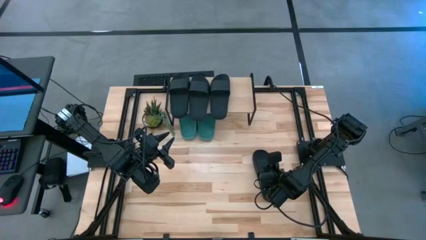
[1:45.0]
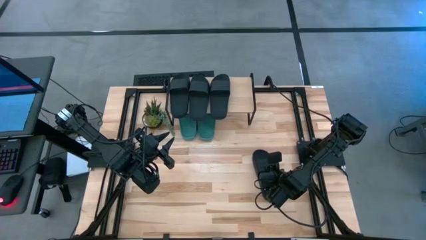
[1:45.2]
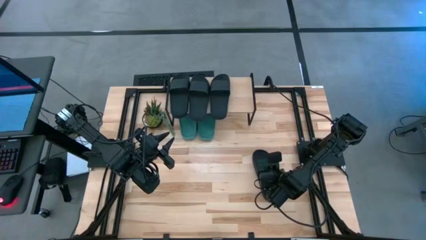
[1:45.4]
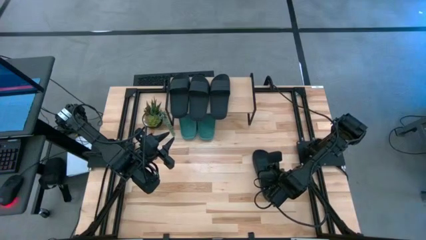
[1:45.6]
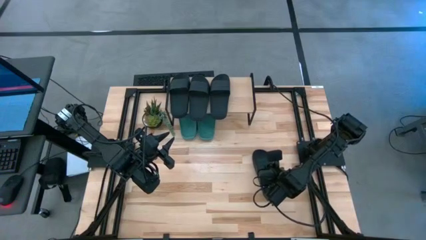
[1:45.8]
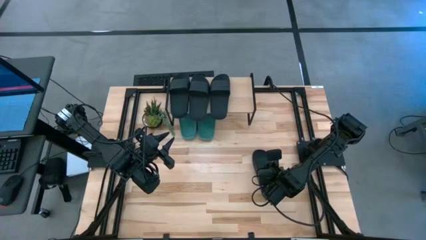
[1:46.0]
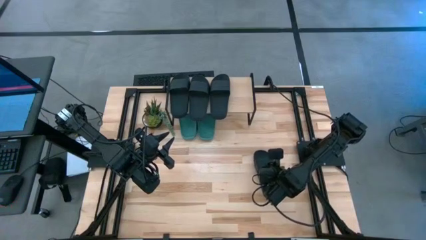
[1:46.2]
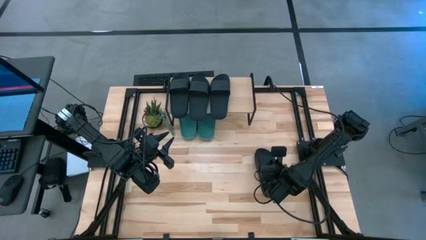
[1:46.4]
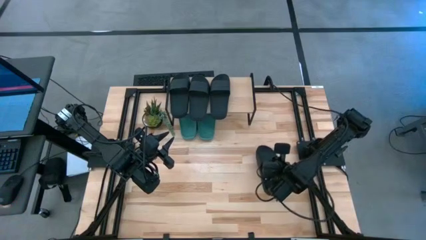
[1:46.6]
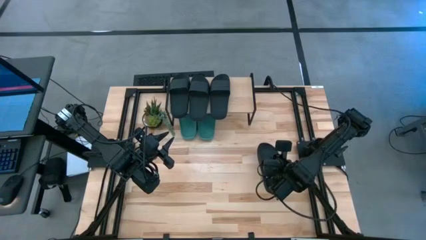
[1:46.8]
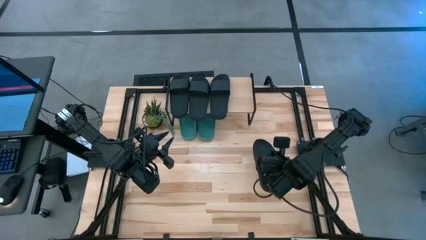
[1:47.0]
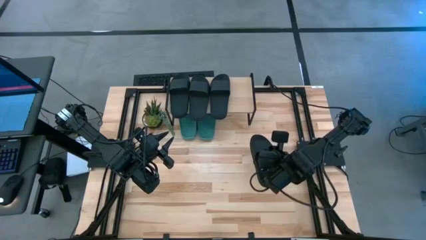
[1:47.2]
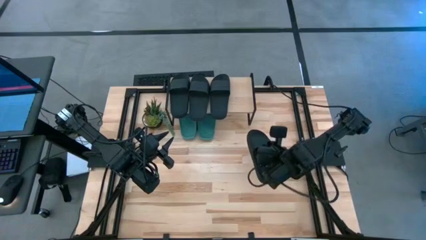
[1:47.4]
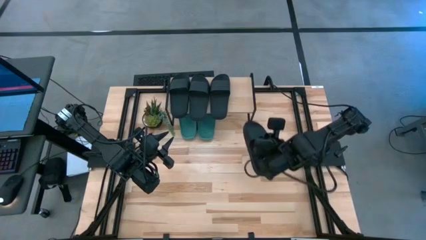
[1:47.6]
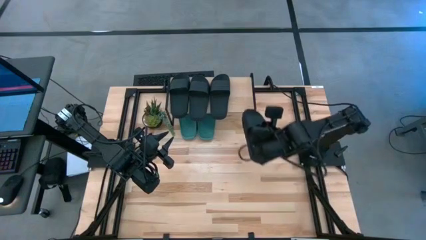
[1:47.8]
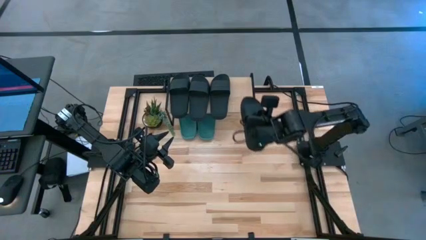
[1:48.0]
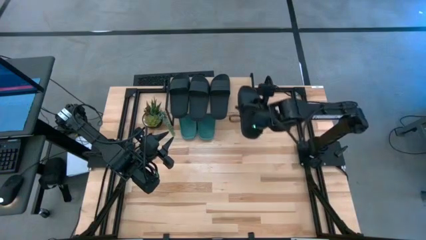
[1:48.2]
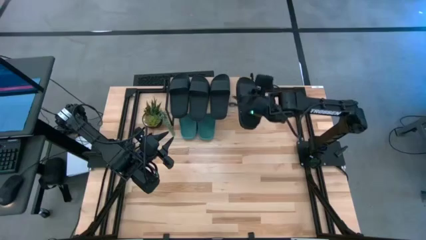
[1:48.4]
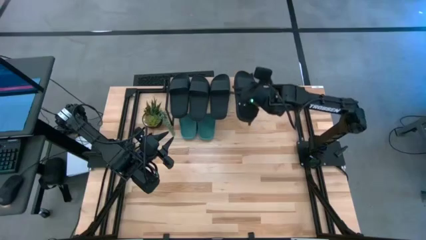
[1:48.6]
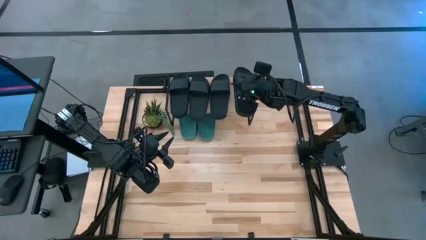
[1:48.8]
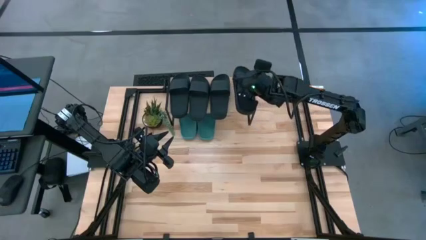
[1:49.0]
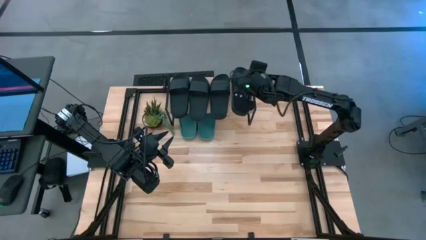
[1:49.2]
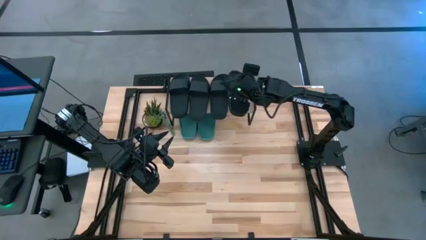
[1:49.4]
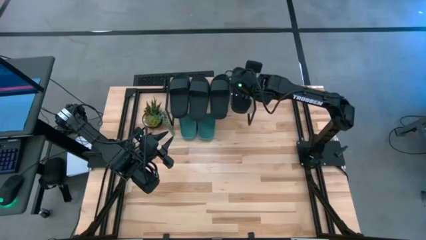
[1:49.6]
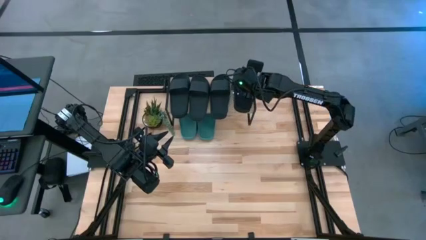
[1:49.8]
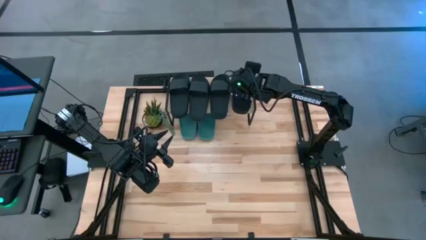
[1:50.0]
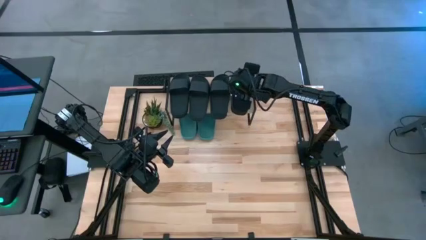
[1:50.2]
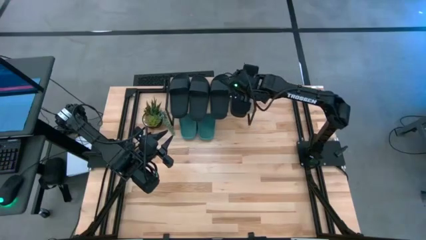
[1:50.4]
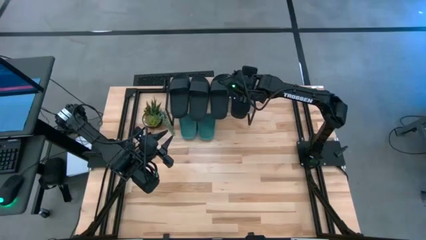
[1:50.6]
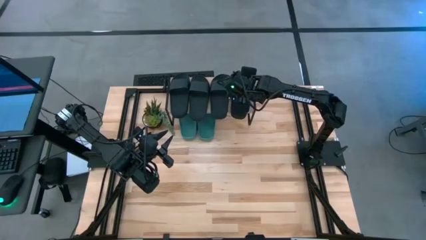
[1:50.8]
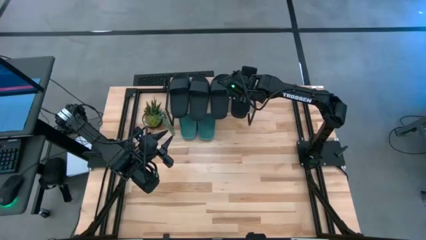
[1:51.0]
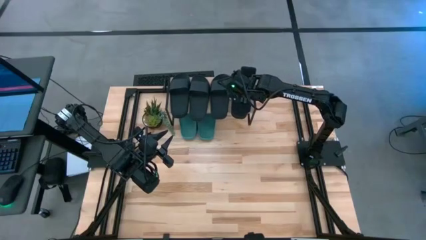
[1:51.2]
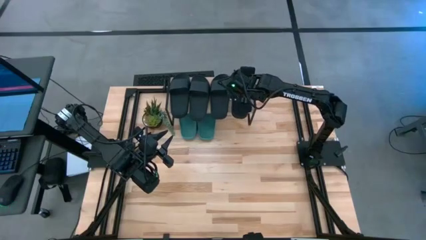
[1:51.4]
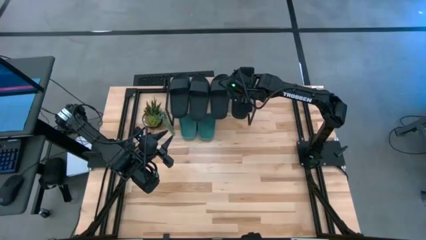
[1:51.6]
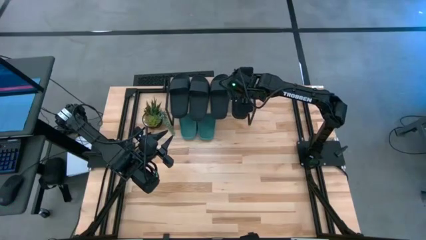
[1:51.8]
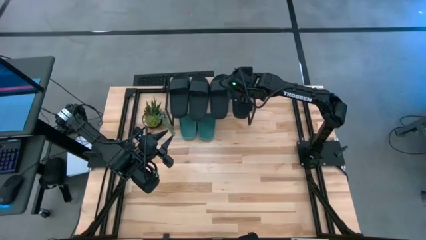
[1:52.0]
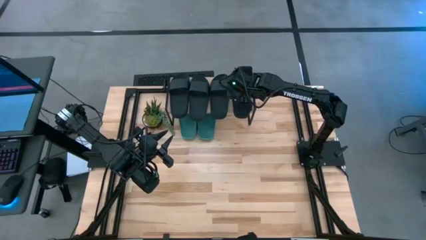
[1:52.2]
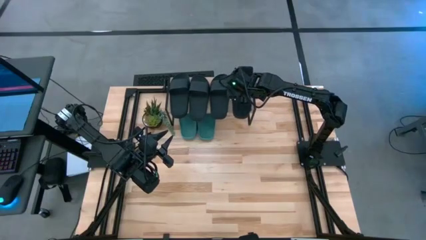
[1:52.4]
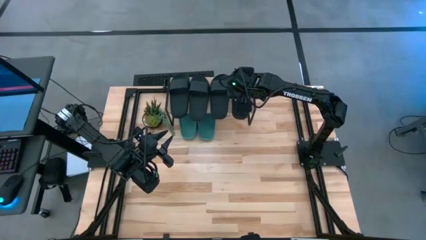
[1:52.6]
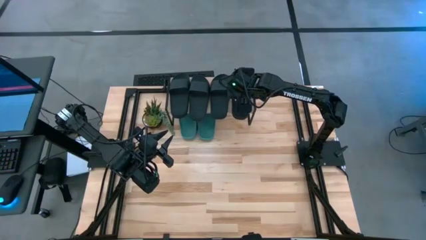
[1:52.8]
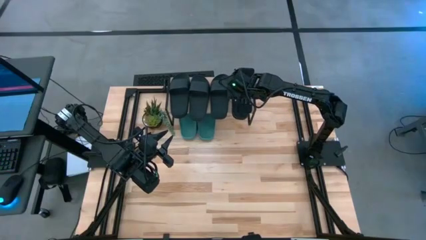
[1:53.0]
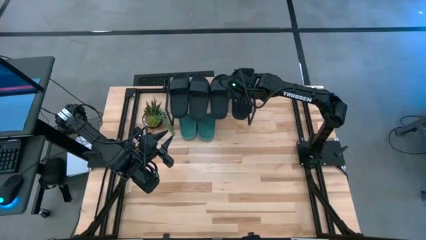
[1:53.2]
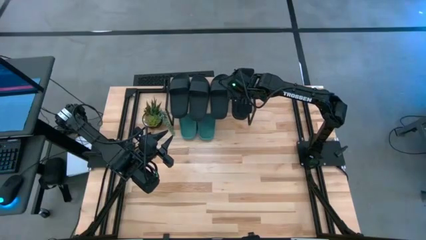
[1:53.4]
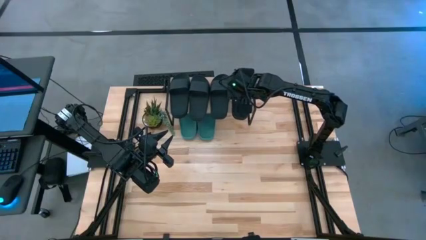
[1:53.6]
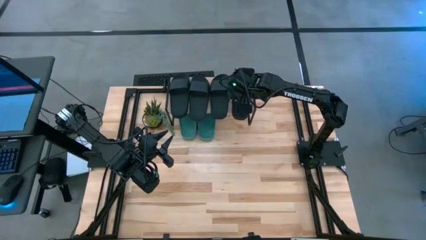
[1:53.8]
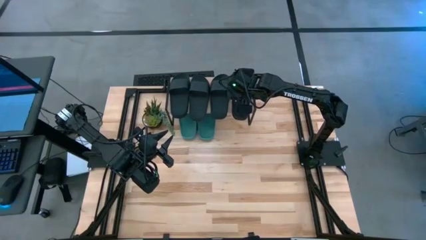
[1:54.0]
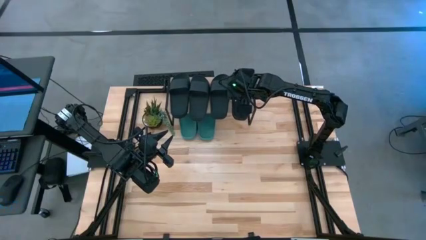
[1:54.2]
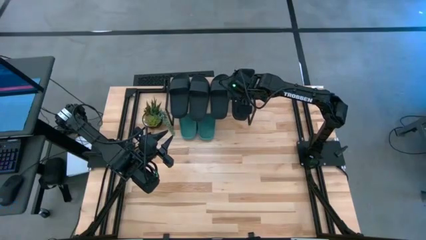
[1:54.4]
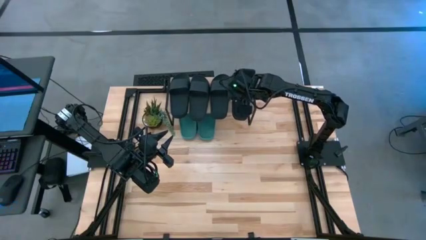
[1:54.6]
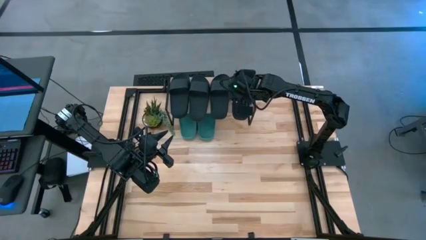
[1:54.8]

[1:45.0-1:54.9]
Task: Pick and place slides into the shelf
Put the black slide on the shelf

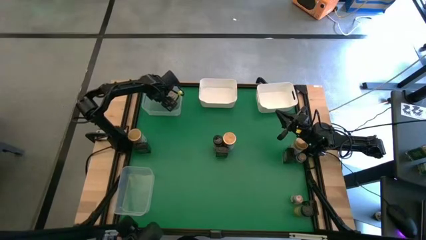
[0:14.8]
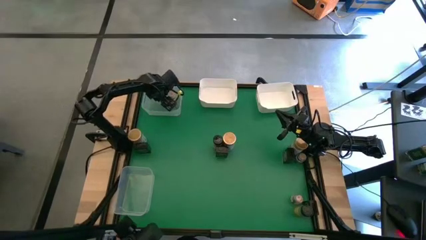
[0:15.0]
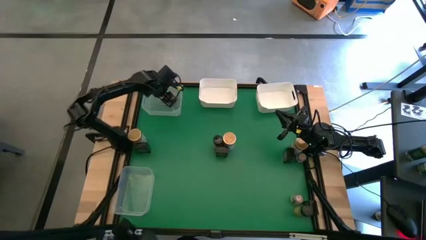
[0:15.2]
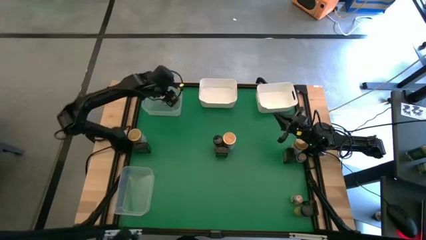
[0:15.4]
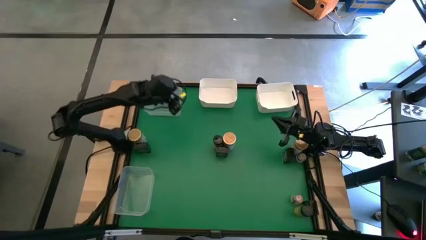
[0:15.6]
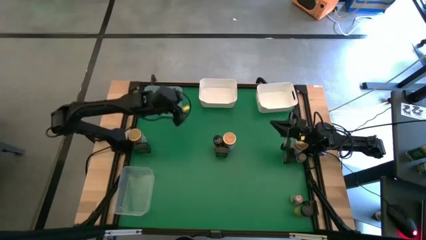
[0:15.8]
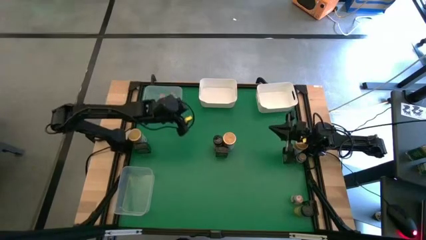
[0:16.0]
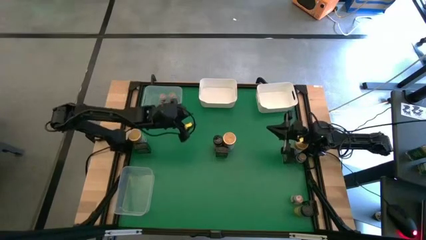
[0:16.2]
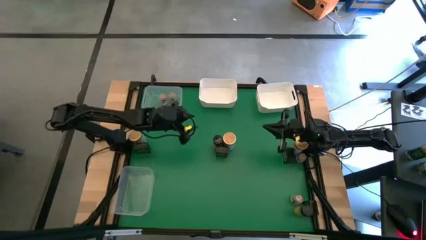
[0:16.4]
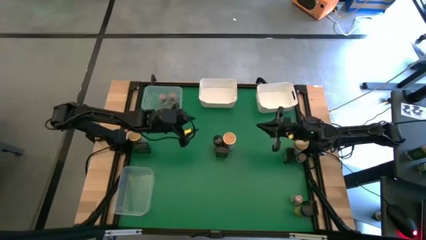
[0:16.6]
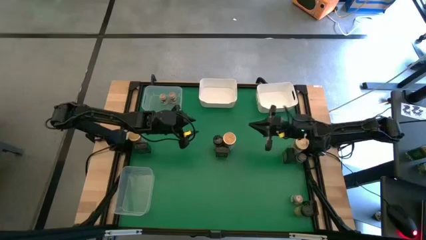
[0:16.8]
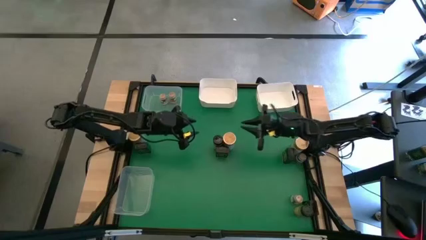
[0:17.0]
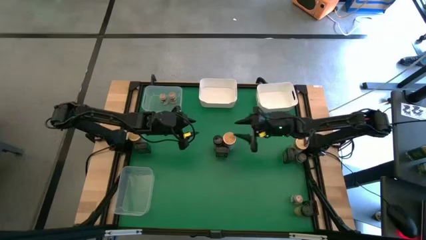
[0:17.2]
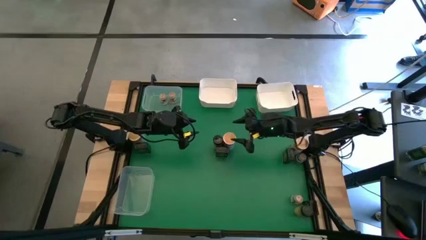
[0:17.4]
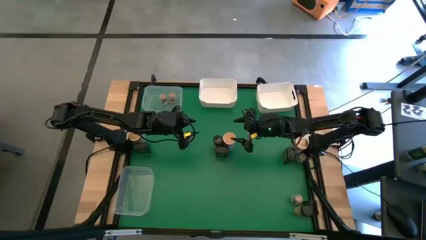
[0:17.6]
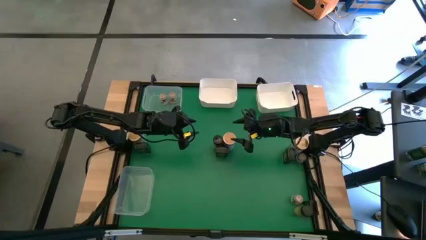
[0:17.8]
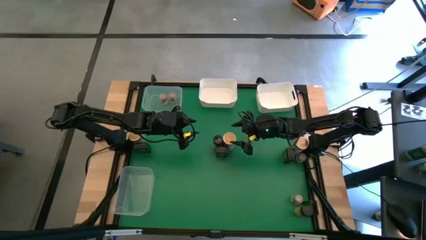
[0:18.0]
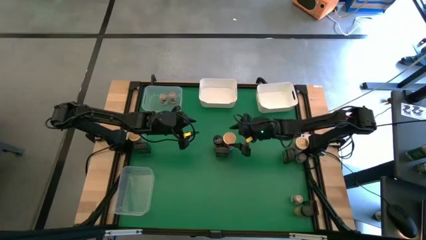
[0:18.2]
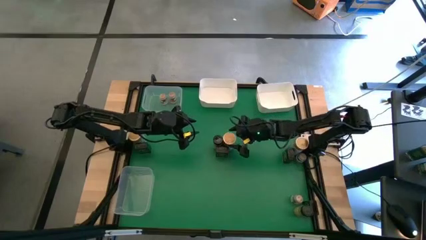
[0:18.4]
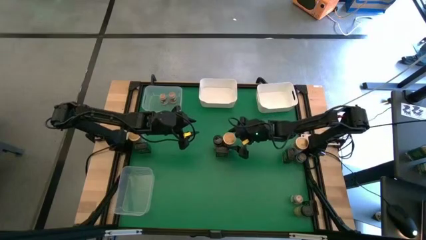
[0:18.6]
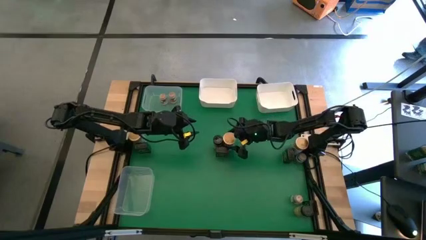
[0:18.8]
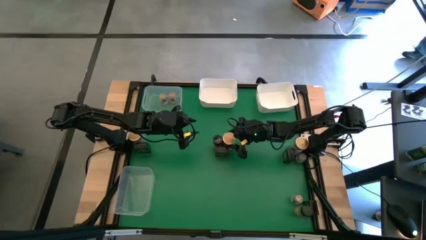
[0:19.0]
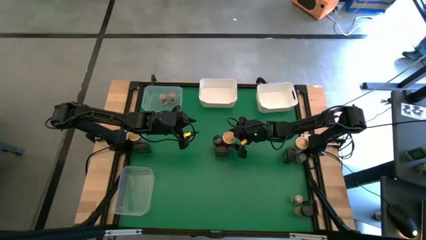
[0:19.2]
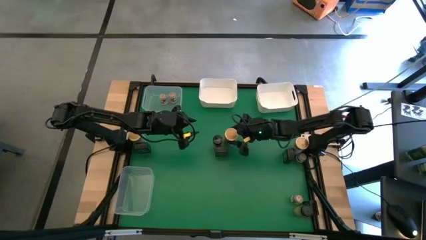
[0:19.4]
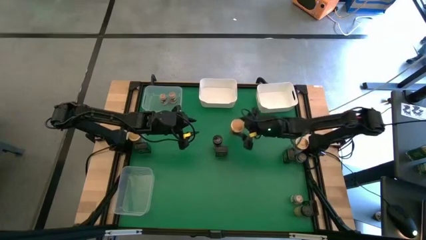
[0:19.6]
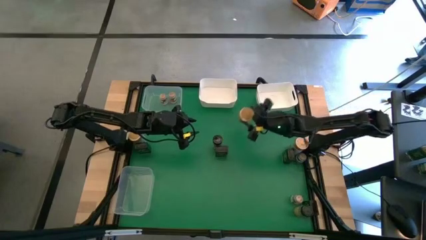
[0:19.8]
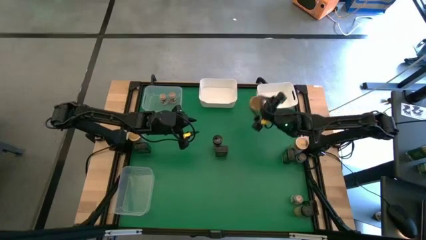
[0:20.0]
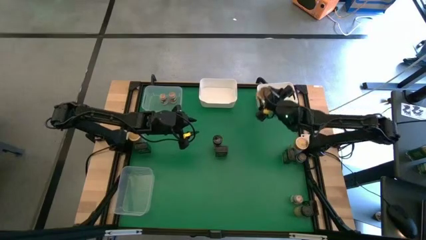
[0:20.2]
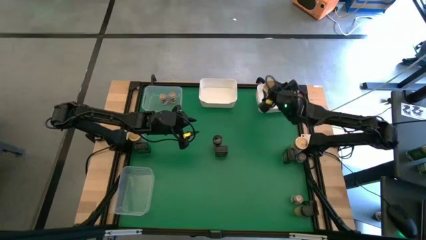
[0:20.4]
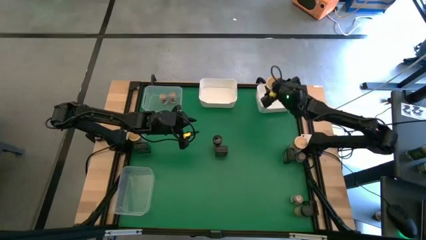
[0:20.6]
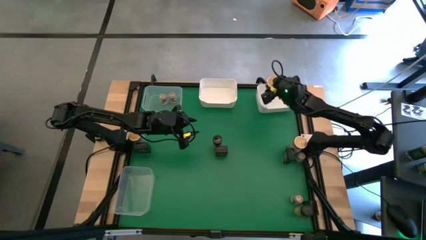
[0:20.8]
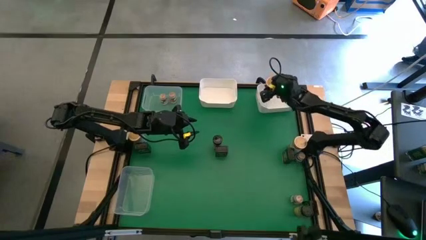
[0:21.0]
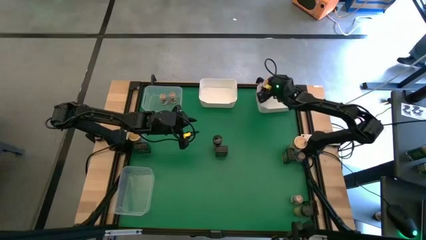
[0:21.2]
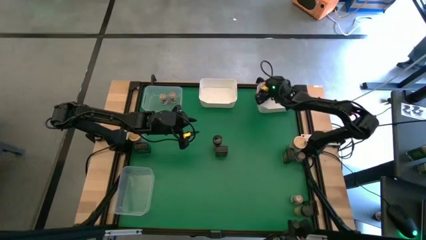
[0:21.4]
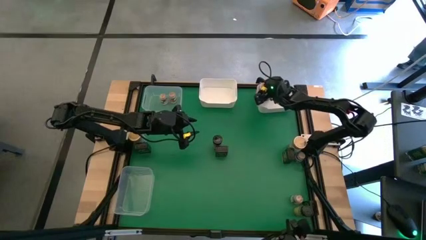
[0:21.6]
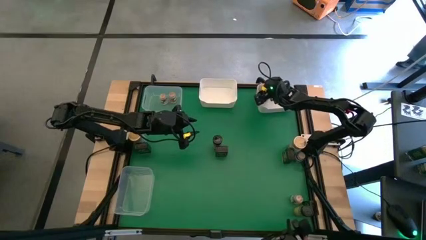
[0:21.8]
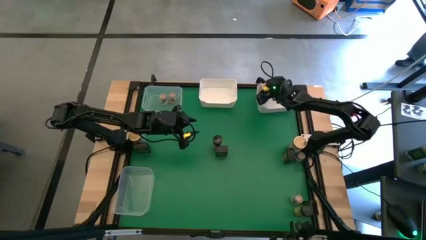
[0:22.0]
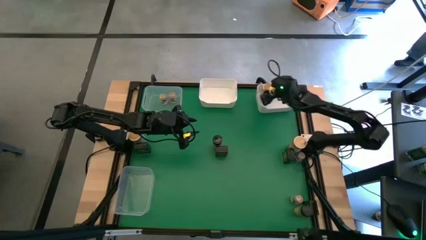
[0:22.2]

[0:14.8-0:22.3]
Task: Sort spices by type
Put the middle big brown seasoning bottle into the white right bin
